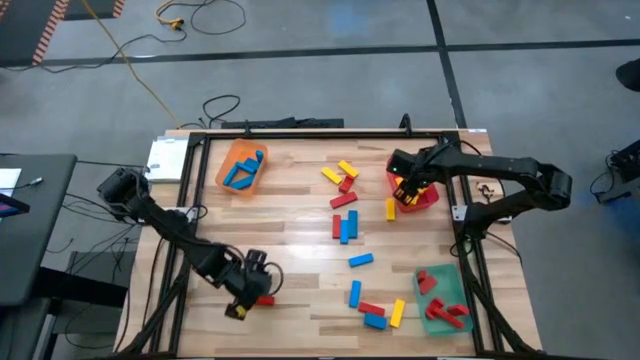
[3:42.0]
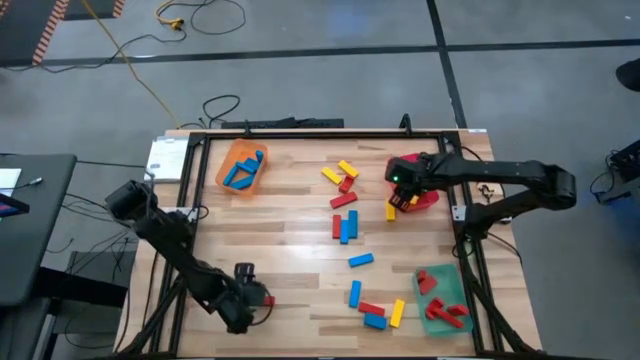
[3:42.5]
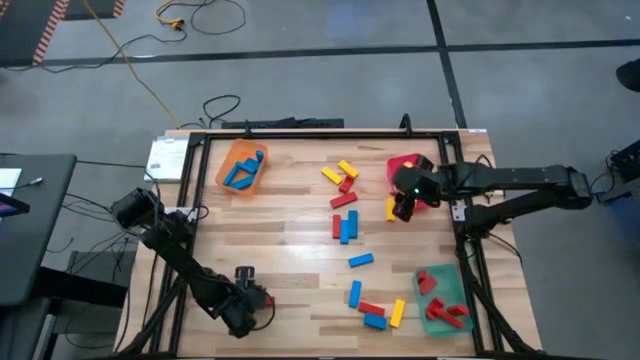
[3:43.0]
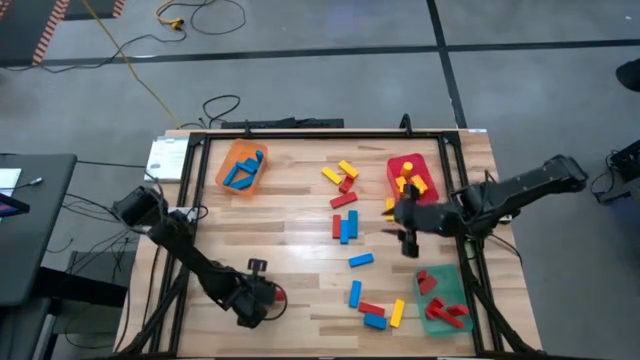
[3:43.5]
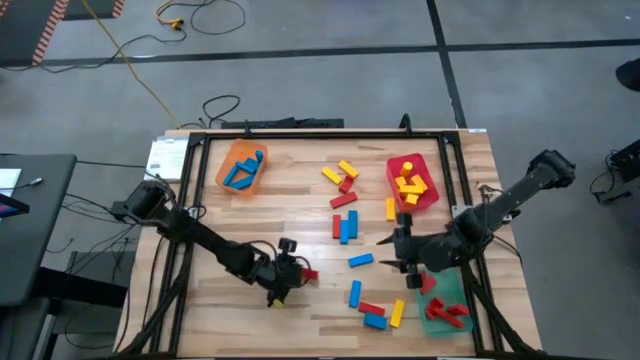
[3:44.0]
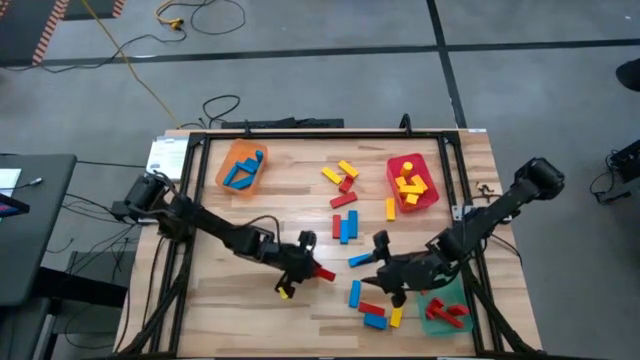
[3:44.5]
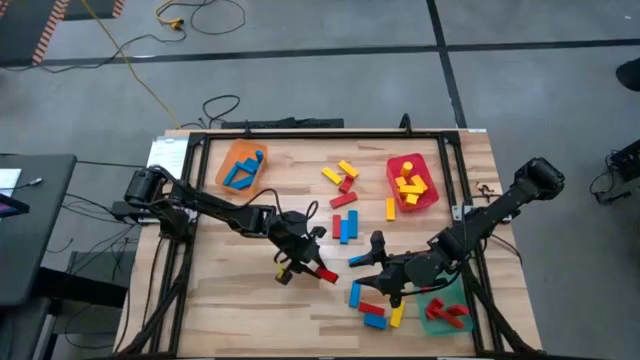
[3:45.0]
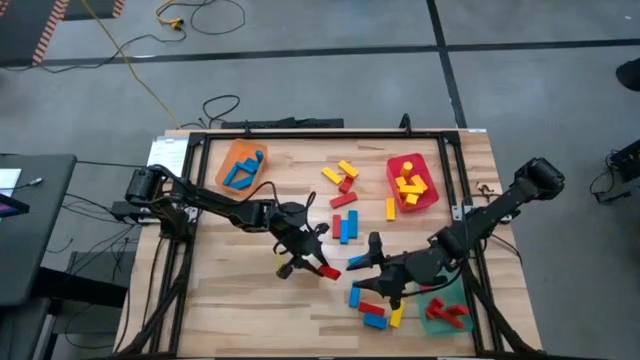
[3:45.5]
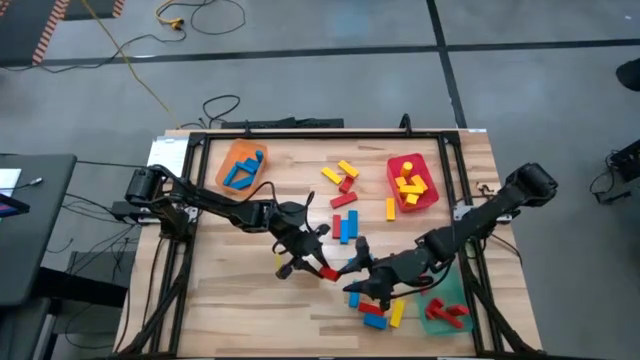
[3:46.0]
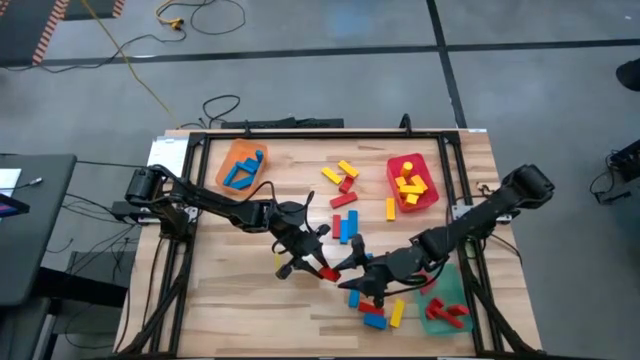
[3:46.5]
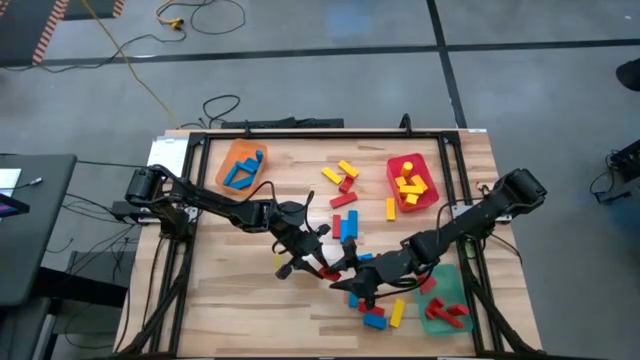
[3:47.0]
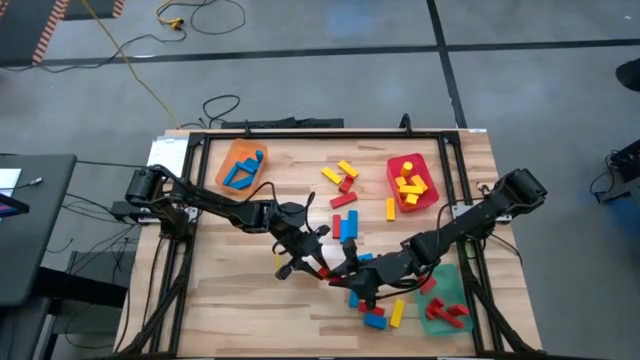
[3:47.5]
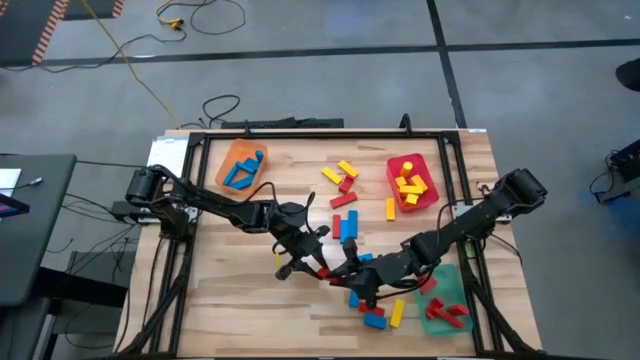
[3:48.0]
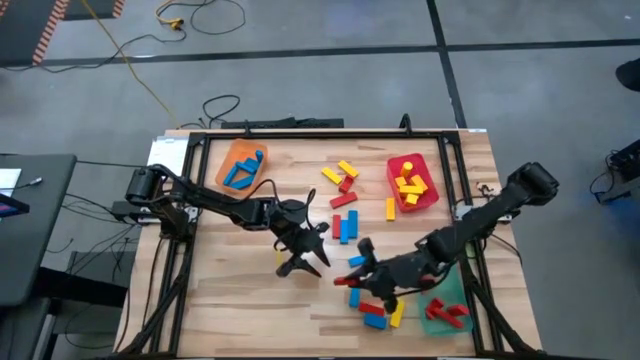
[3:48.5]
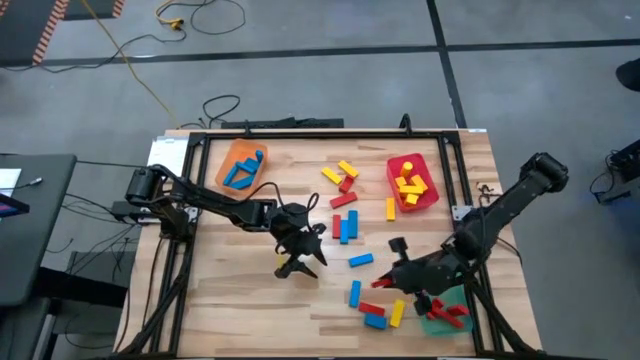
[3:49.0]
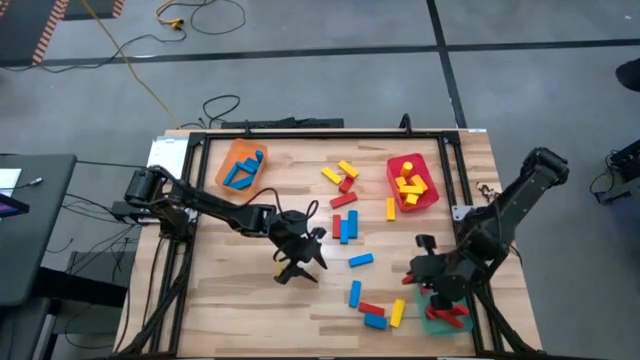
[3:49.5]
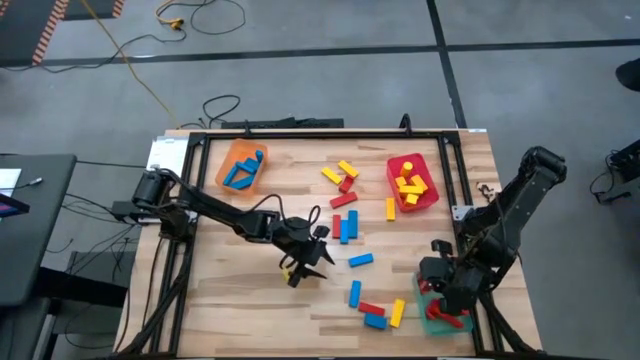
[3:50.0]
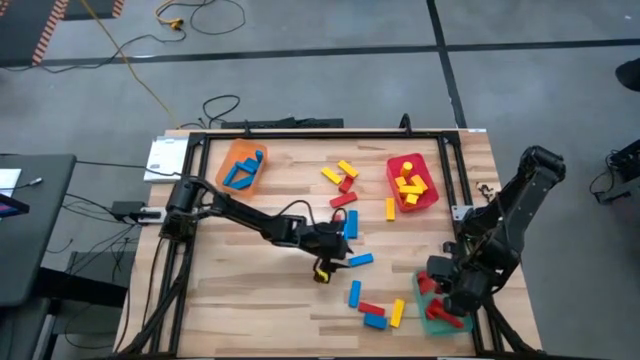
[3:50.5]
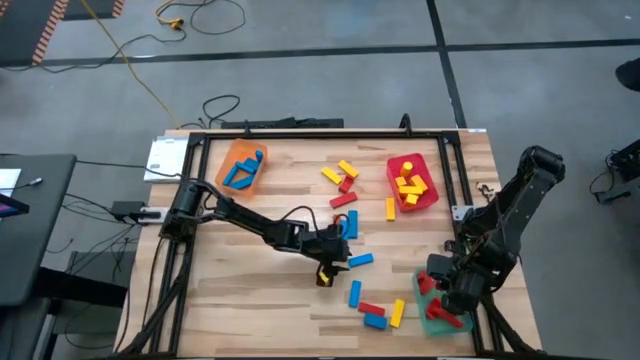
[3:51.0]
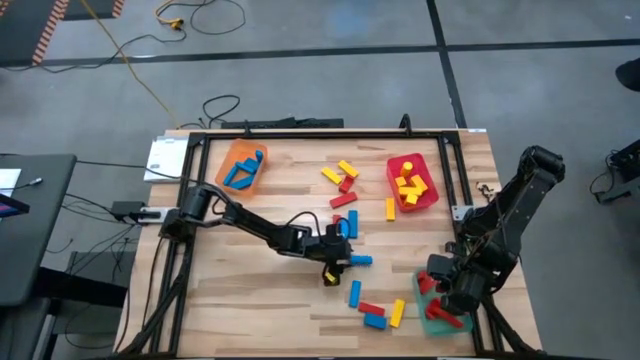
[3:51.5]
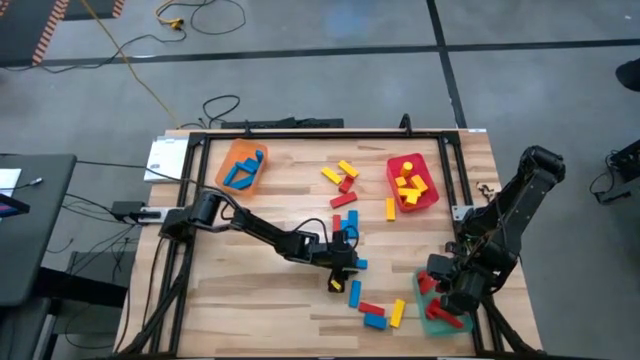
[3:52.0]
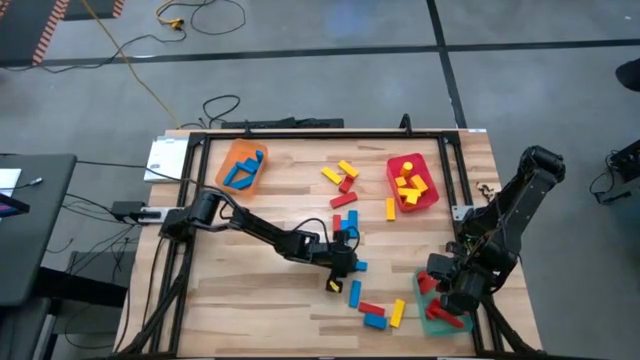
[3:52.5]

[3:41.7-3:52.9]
Task: Sort blocks
Put the red rectangle block into the green bin

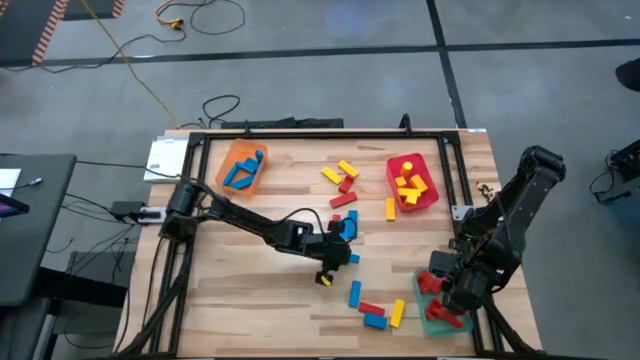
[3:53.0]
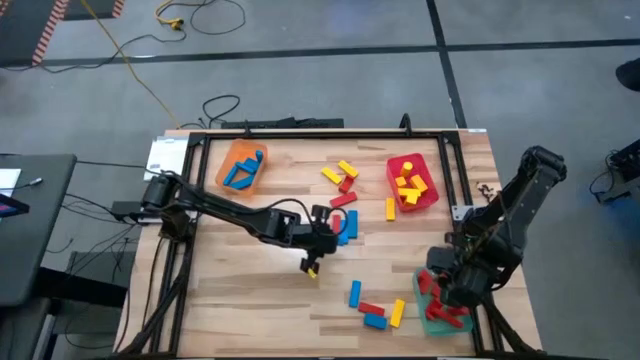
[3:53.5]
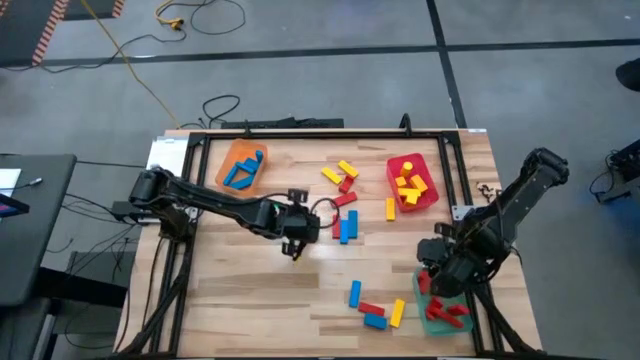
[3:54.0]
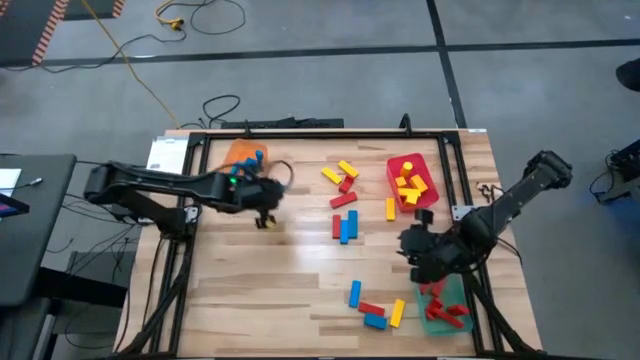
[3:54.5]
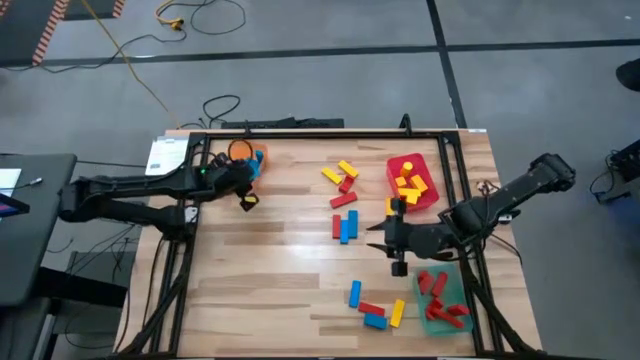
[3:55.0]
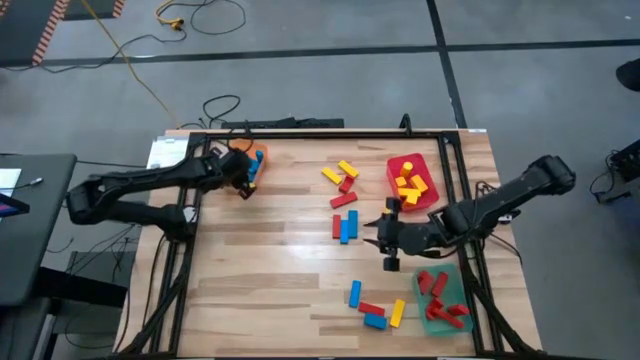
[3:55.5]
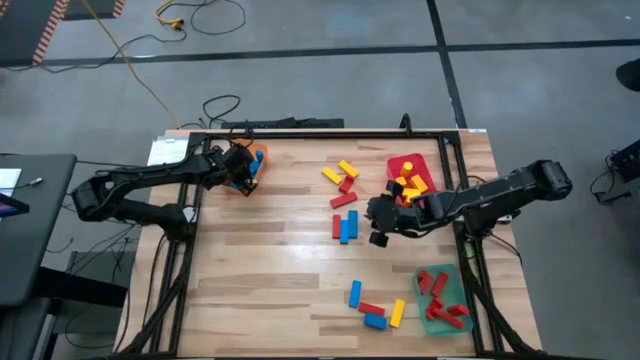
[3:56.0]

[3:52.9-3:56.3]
Put the blue rectangle block into the orange bin

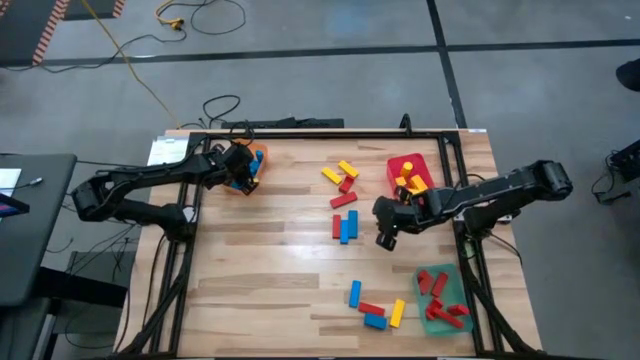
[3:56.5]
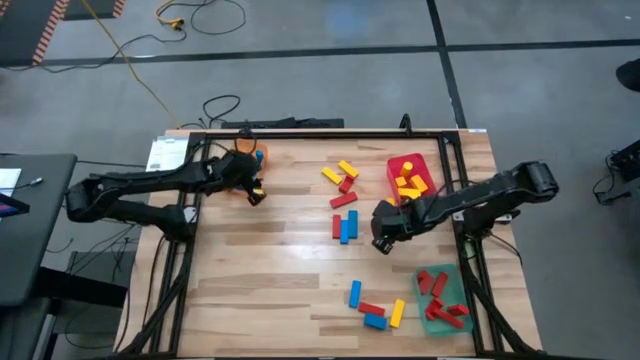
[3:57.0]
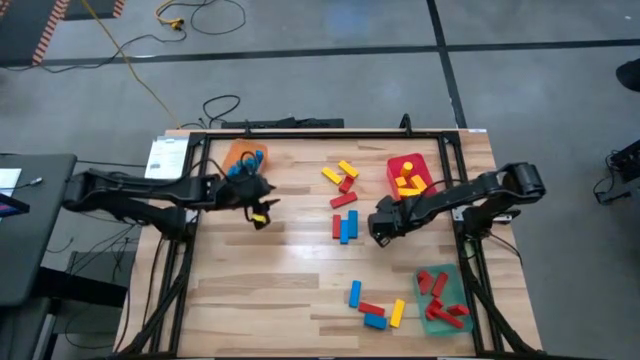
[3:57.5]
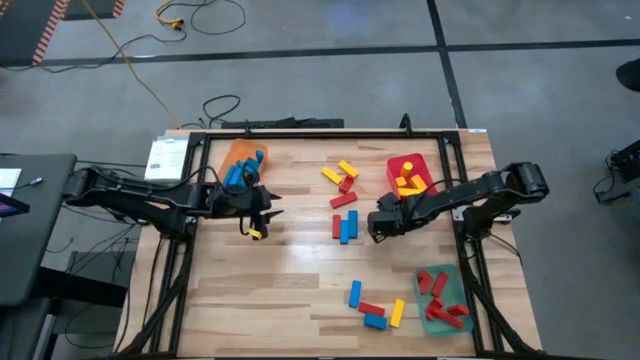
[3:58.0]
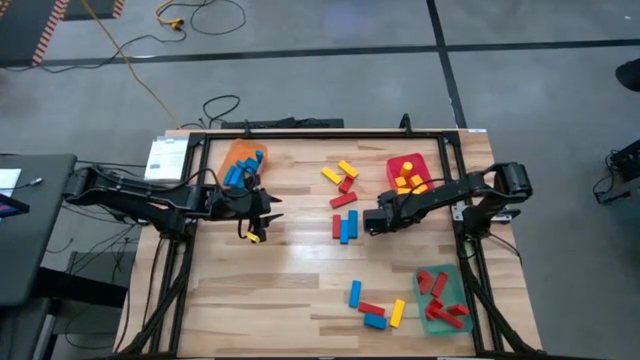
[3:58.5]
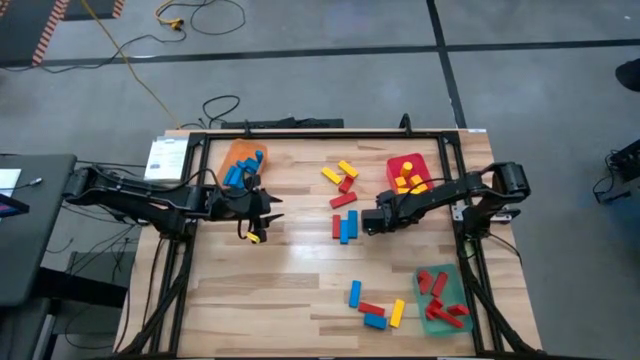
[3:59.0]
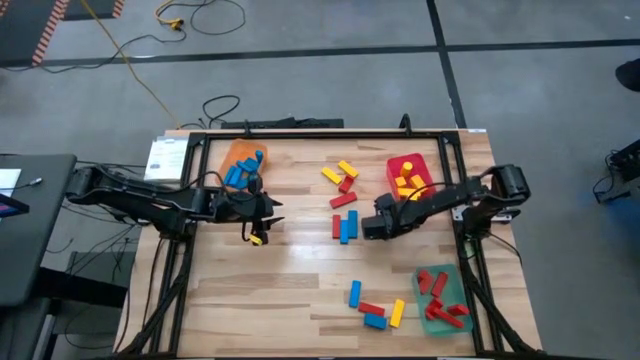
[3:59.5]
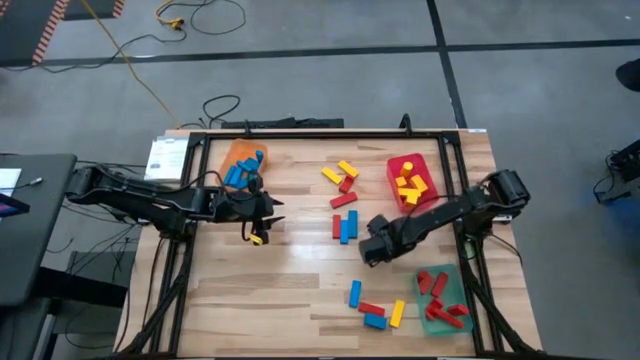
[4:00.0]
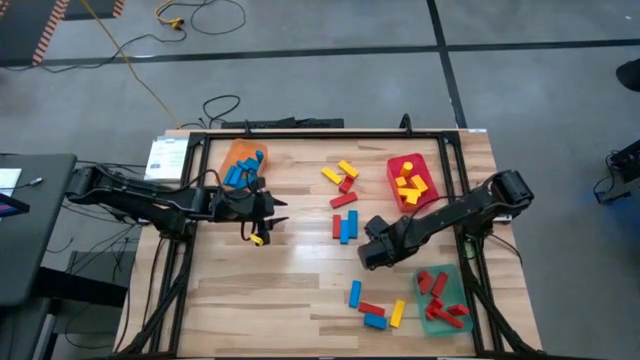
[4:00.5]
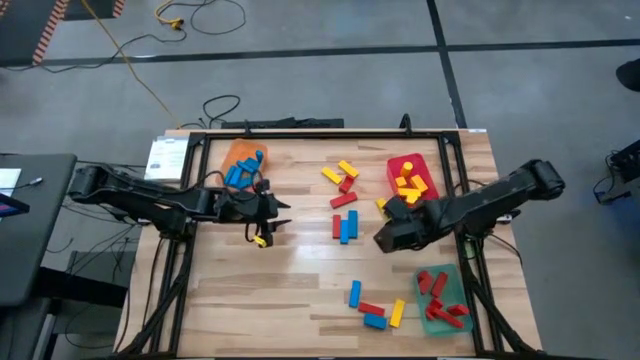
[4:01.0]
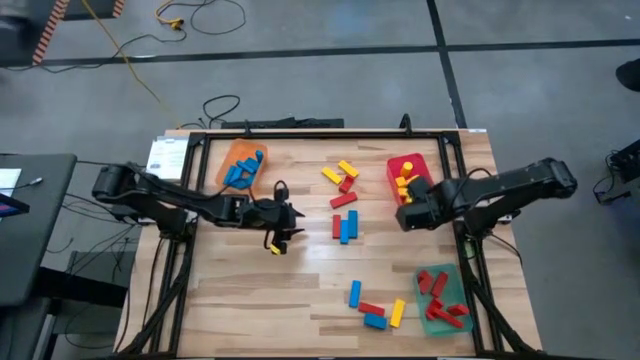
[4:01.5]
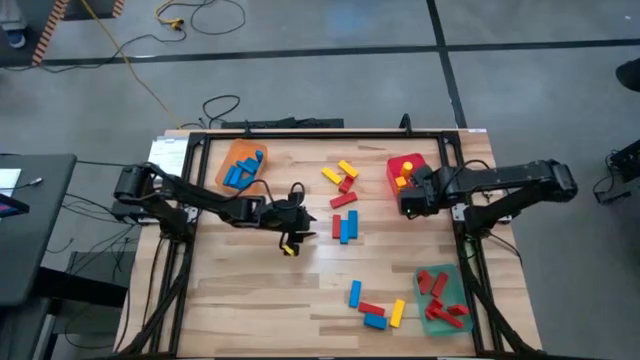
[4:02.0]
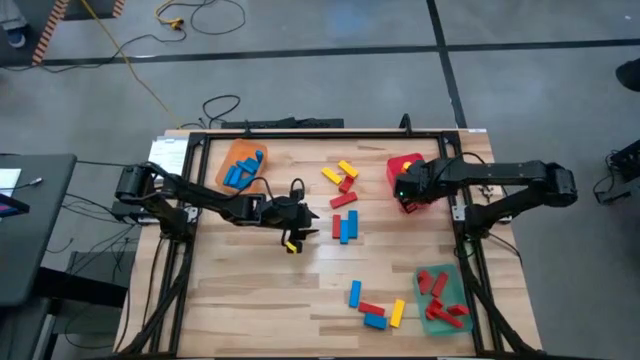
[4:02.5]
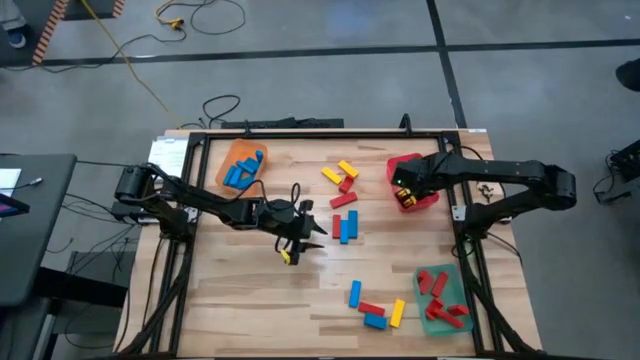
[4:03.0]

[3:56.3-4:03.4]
Put the yellow rectangle block into the red bin

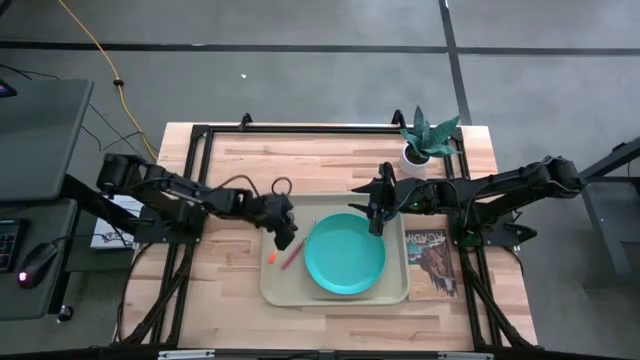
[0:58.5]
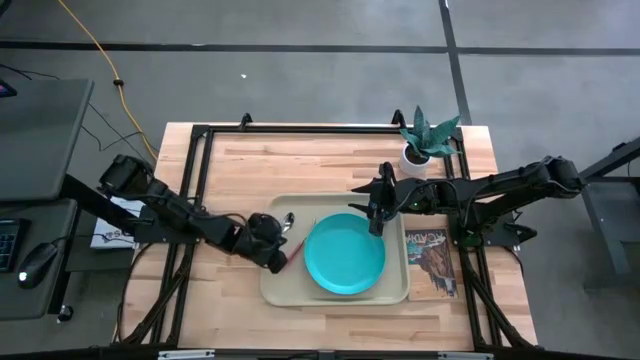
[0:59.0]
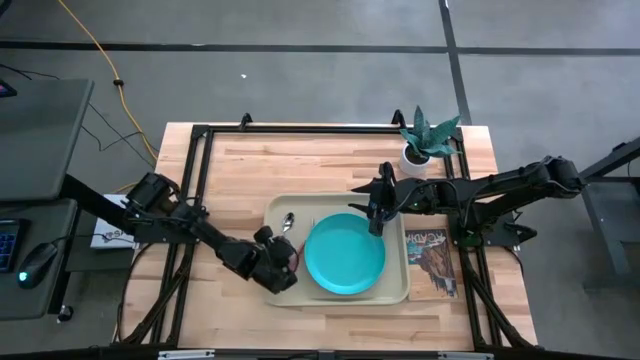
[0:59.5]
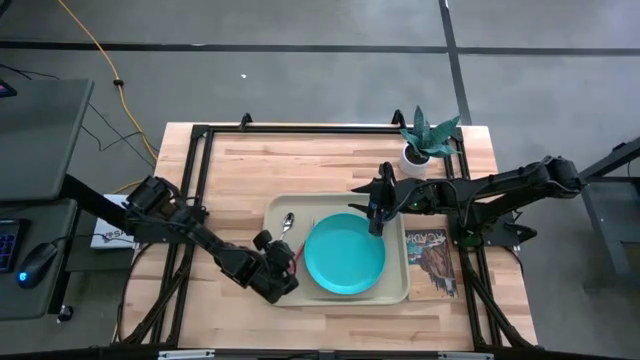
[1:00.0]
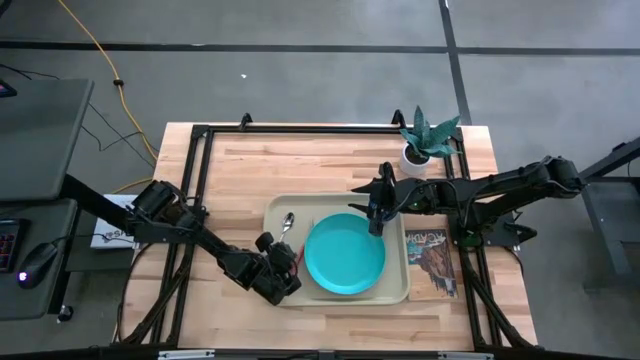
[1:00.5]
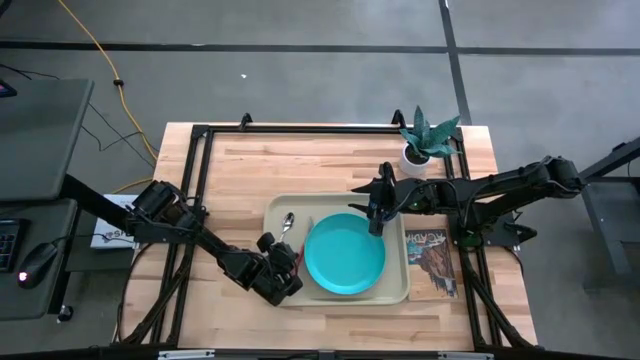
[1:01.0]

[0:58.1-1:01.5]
Task: Pick and place plate/cup/fork/spoon on tray
Put the pink fork to the left of the blue plate on the gray serving tray
